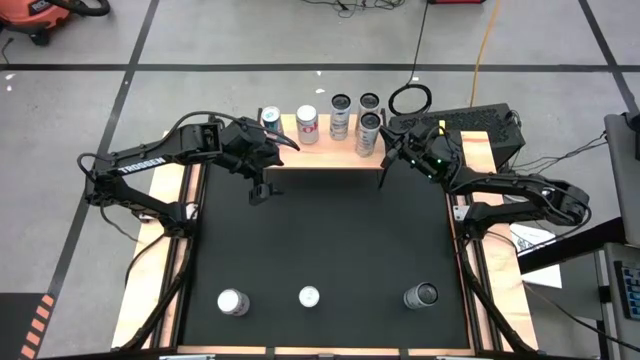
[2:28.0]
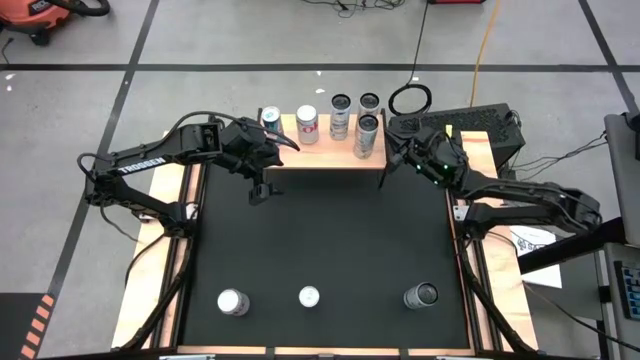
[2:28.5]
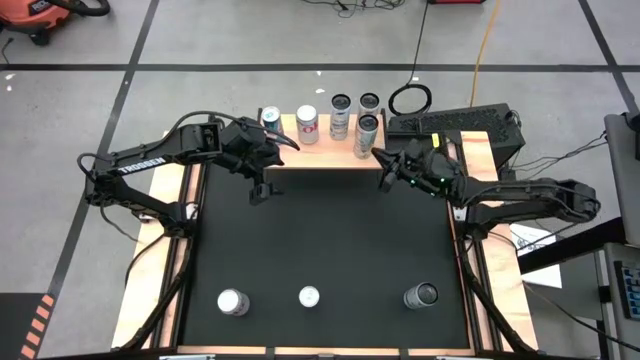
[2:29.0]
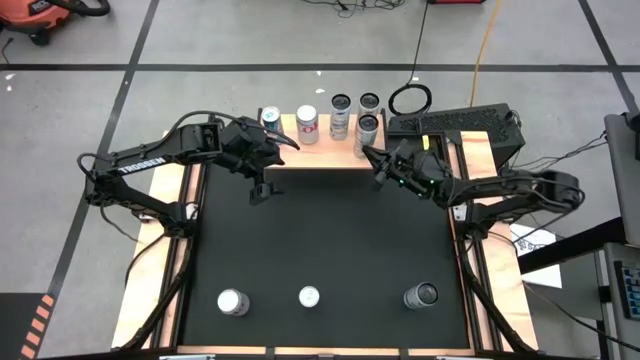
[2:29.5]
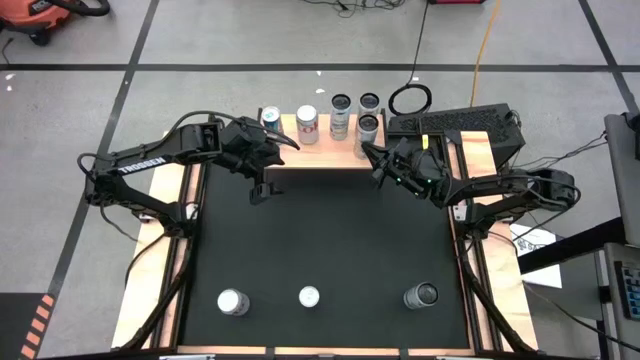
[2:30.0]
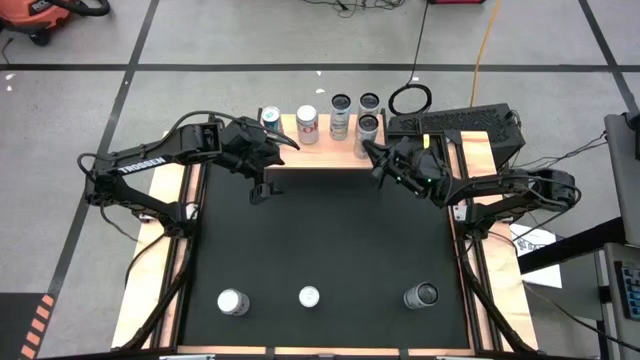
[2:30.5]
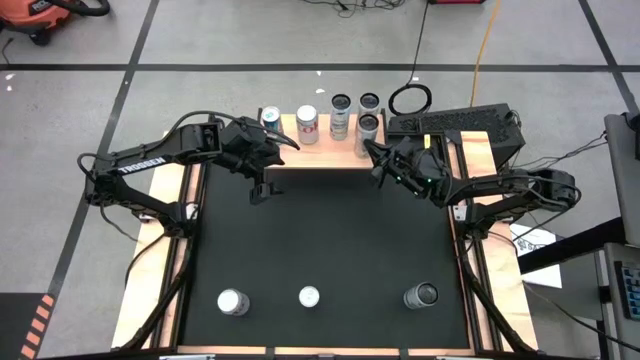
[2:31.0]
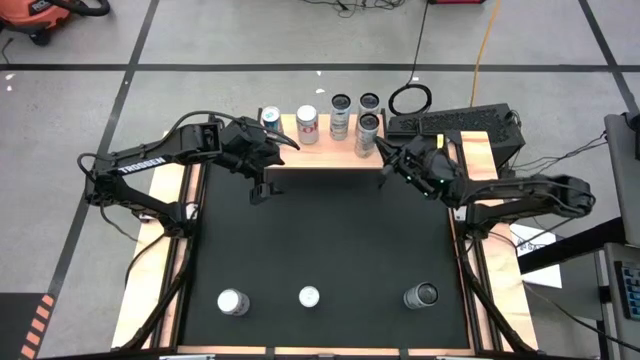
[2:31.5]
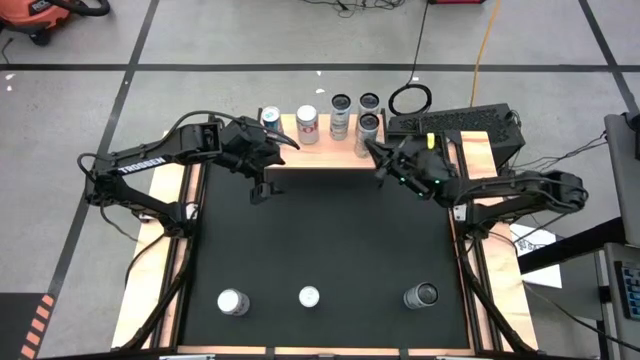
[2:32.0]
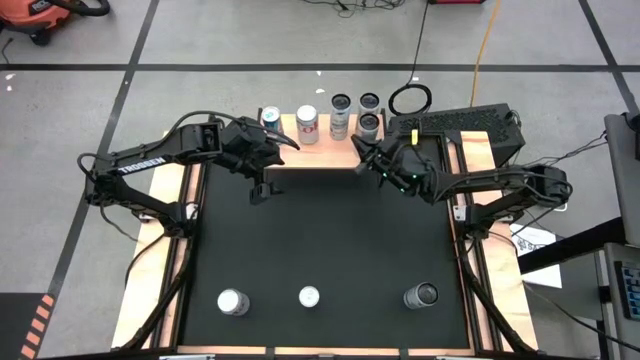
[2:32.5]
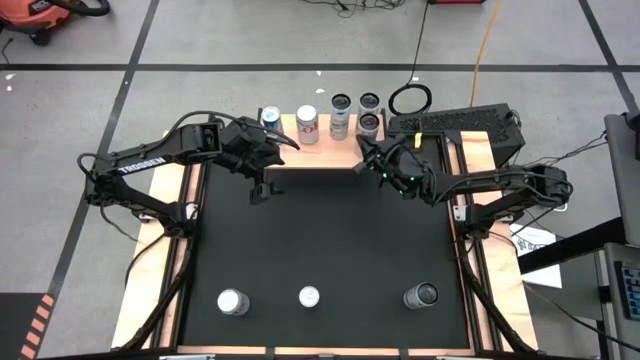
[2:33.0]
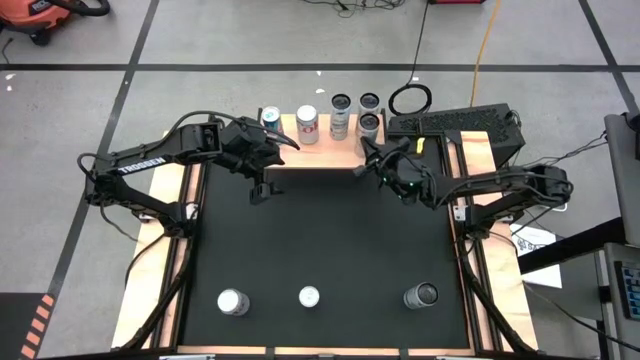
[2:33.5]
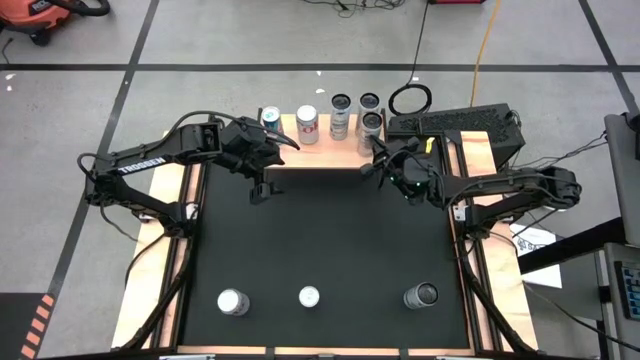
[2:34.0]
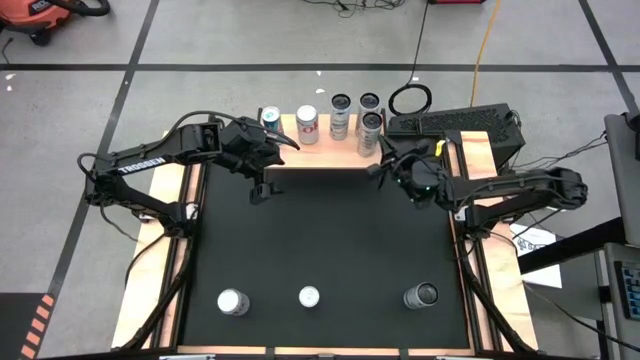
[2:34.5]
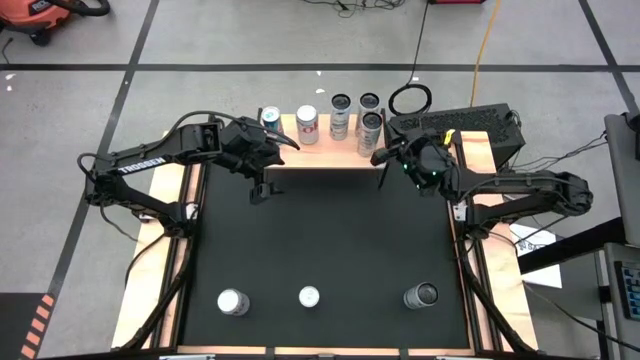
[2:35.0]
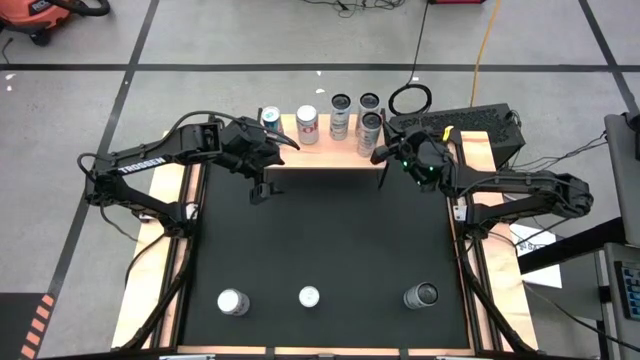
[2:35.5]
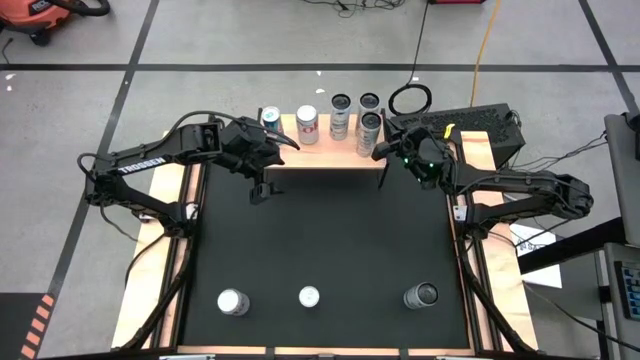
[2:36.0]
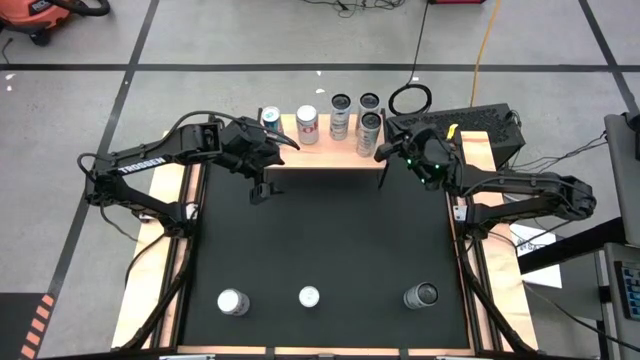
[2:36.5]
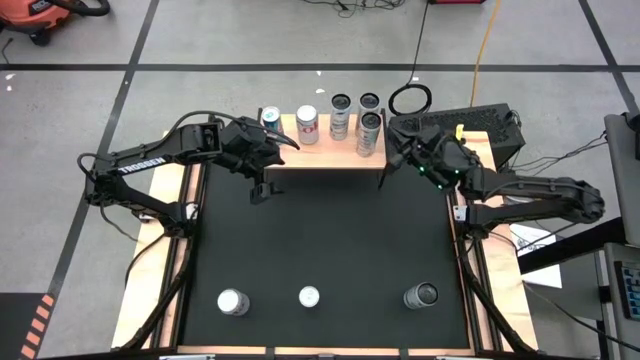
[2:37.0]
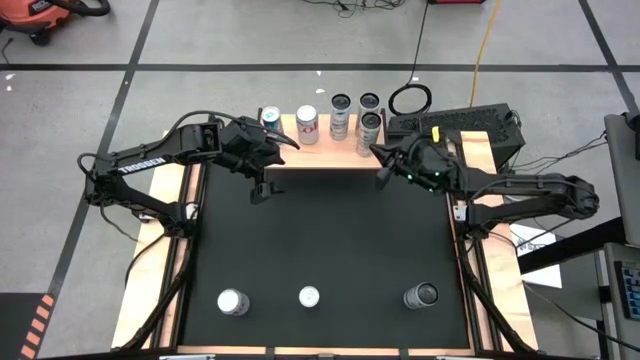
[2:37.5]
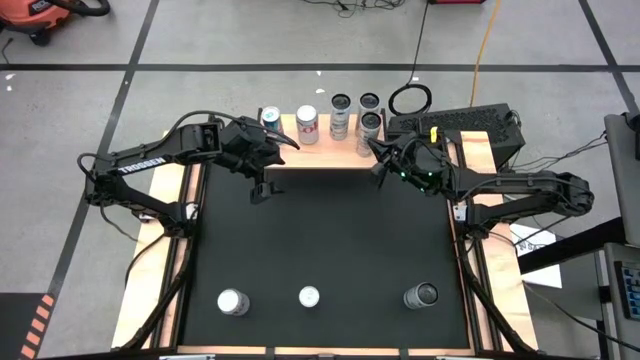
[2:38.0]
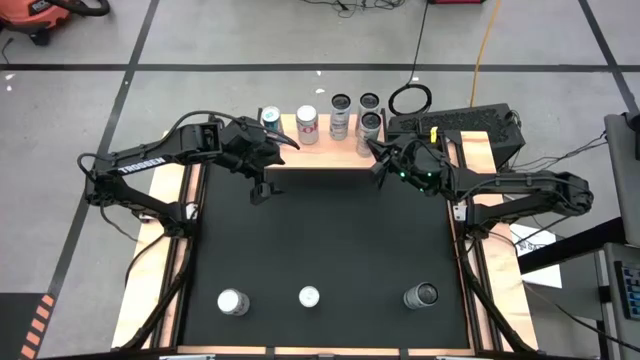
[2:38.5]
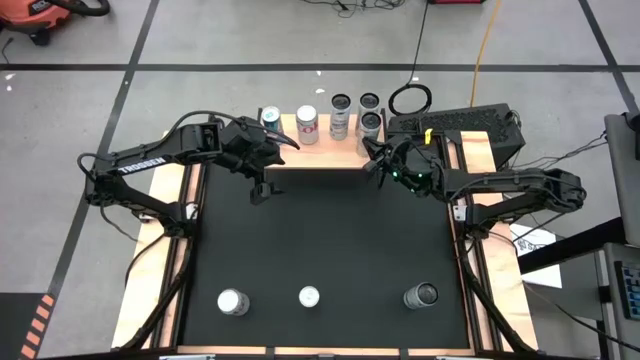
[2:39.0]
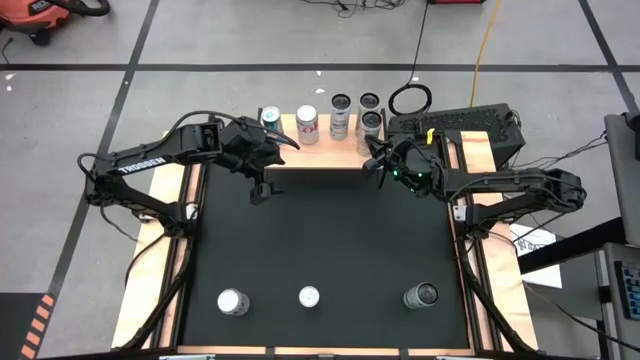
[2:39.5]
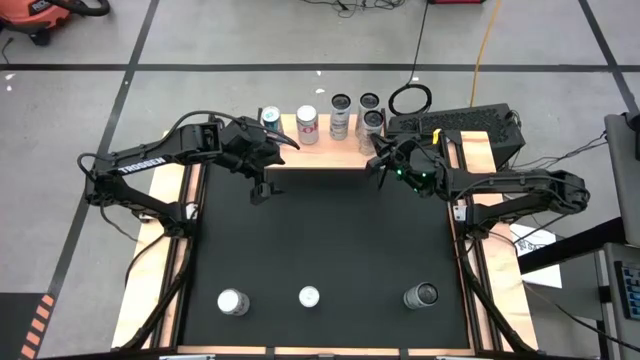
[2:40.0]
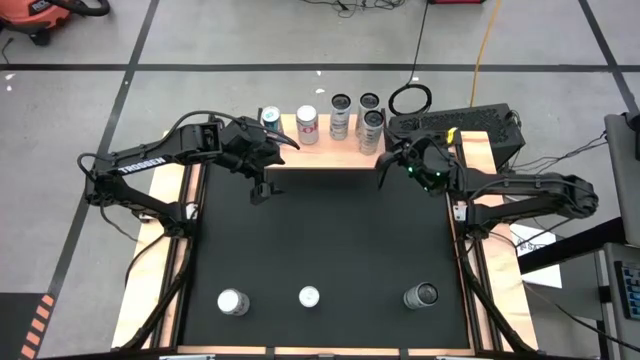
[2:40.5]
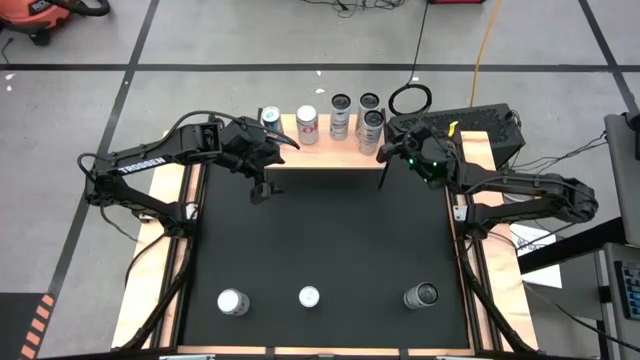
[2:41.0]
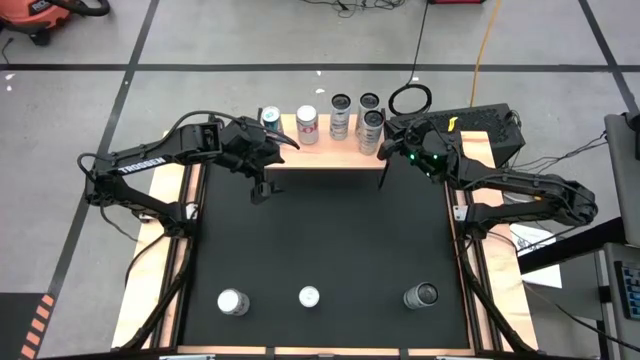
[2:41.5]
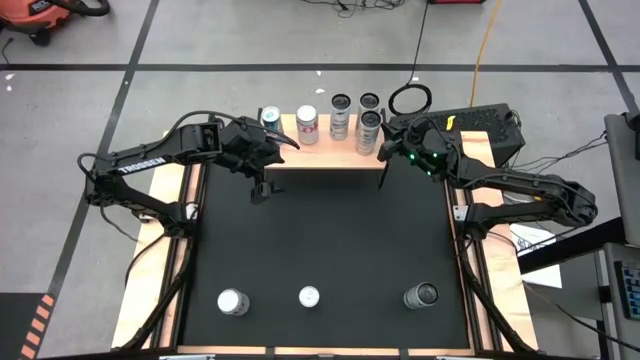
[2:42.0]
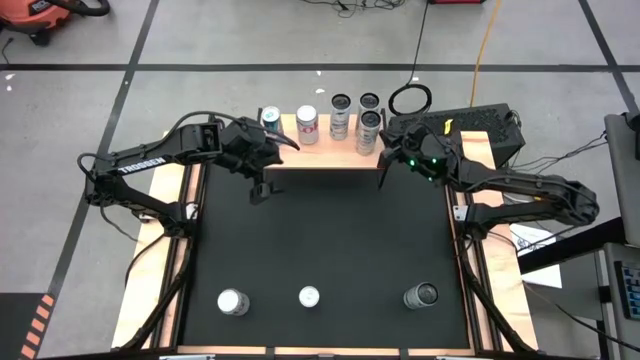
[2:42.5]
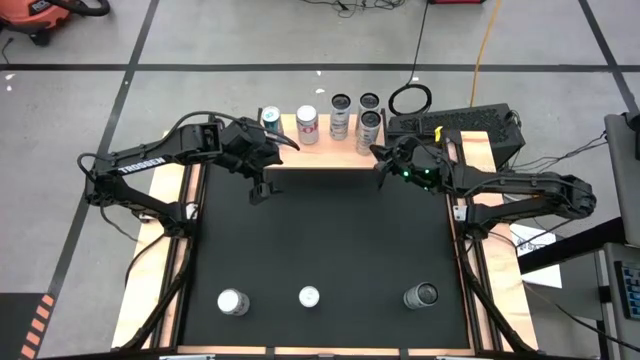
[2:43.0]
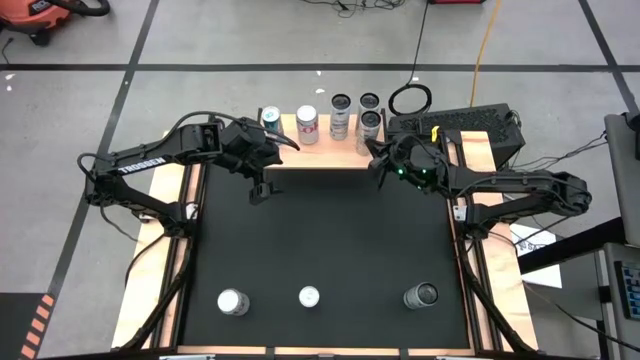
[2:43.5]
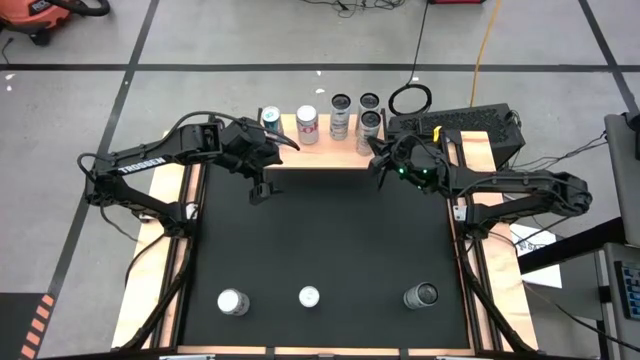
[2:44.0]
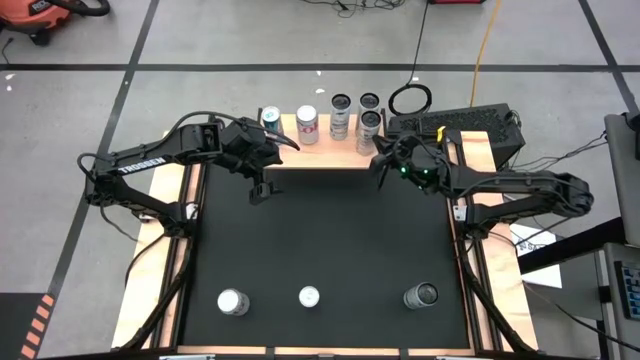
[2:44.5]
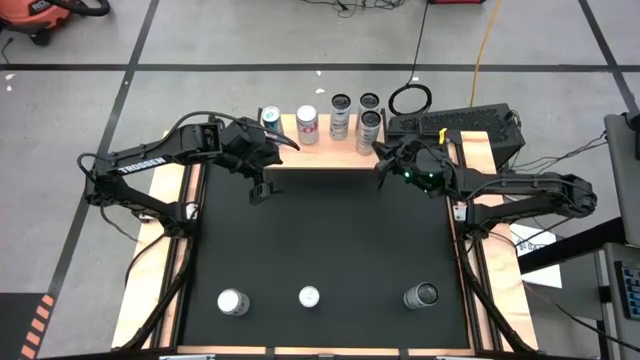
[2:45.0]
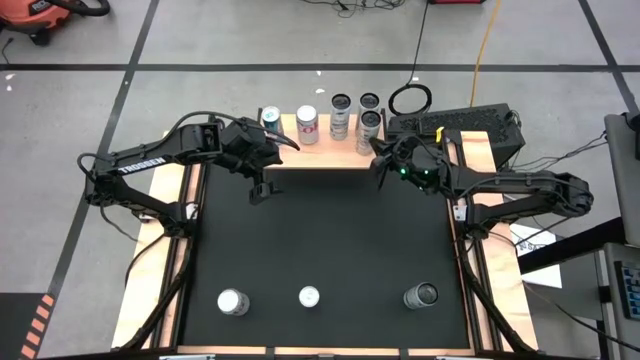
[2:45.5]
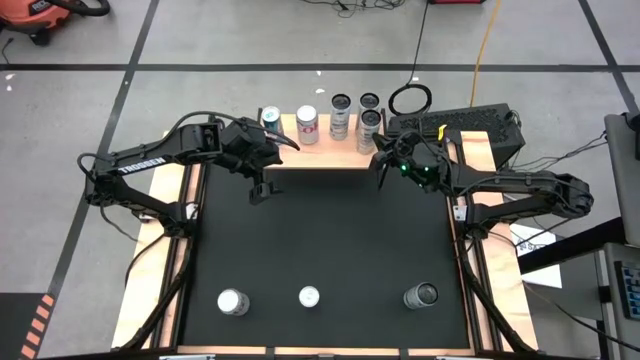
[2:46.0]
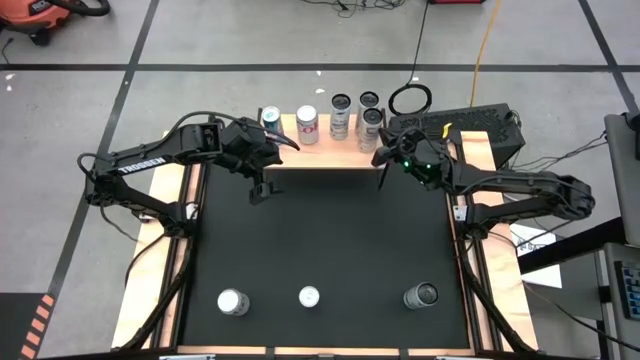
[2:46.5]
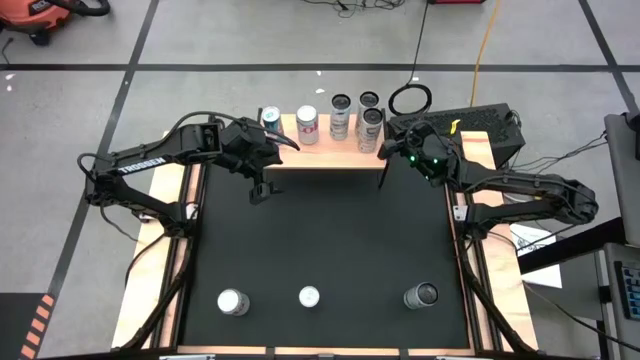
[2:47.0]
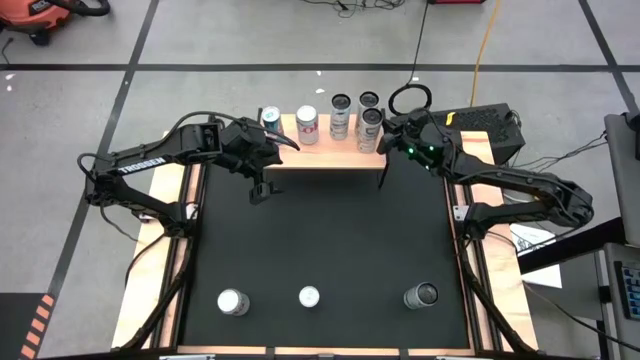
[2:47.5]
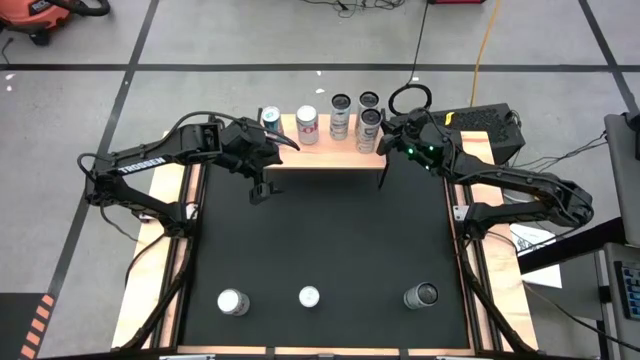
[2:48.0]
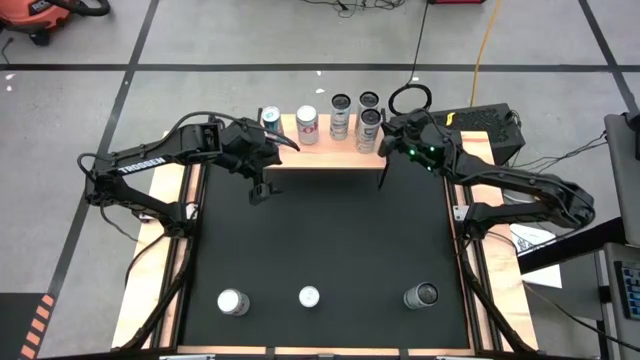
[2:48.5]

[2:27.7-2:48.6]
Task: Place canned beverage on shelf
Put the white yellow soda can on the shelf aligned with the other white yellow soda can
